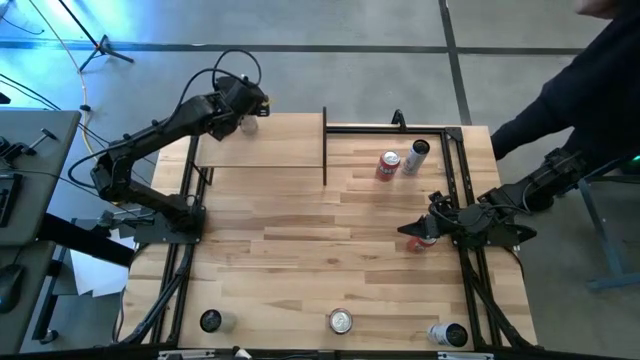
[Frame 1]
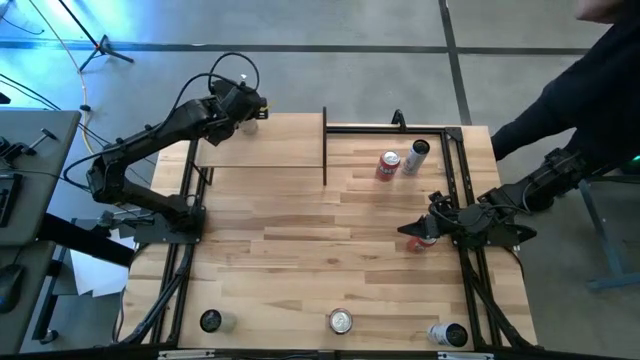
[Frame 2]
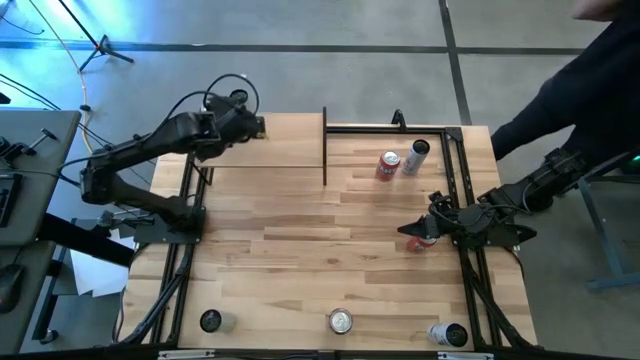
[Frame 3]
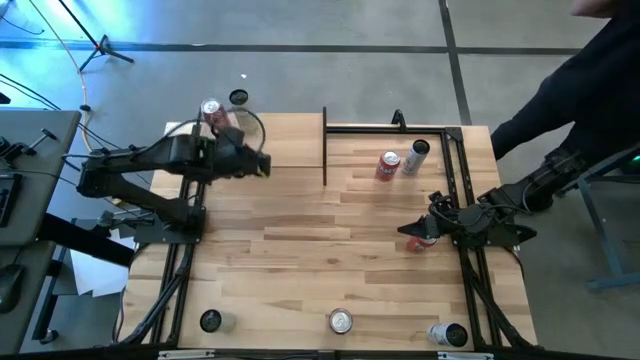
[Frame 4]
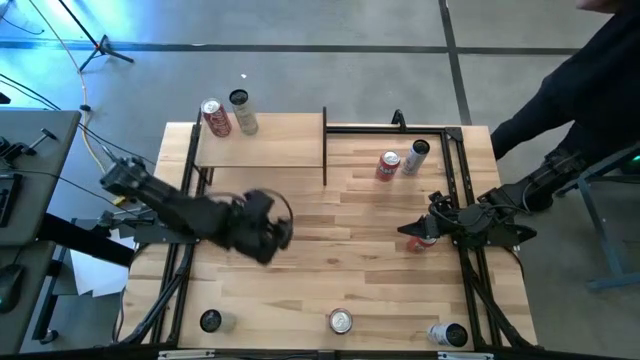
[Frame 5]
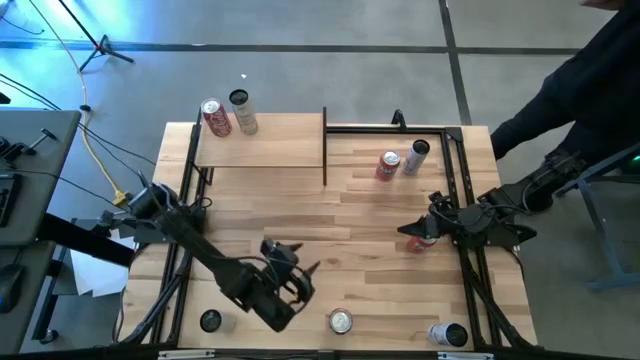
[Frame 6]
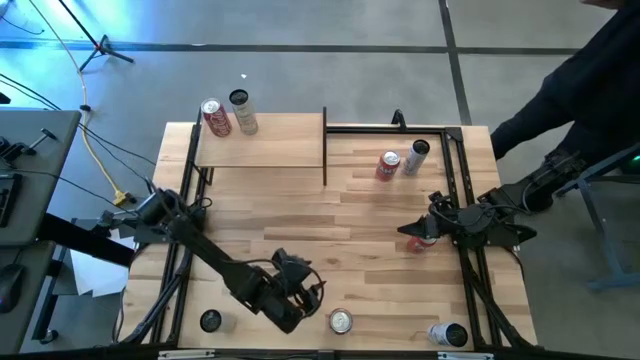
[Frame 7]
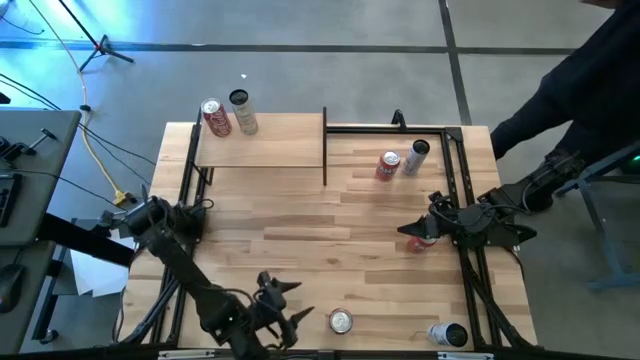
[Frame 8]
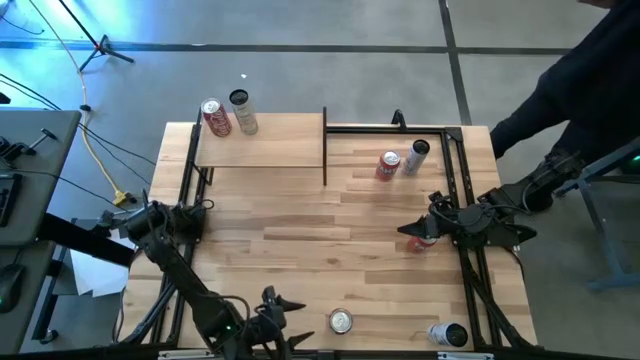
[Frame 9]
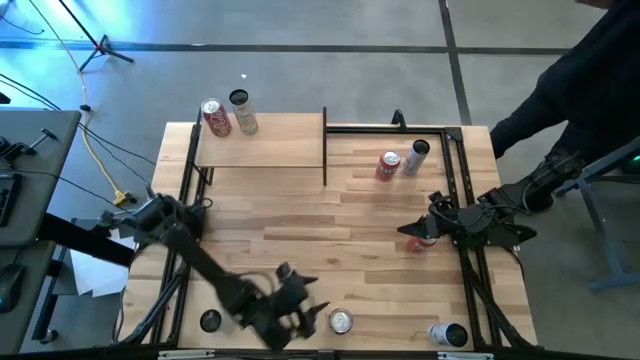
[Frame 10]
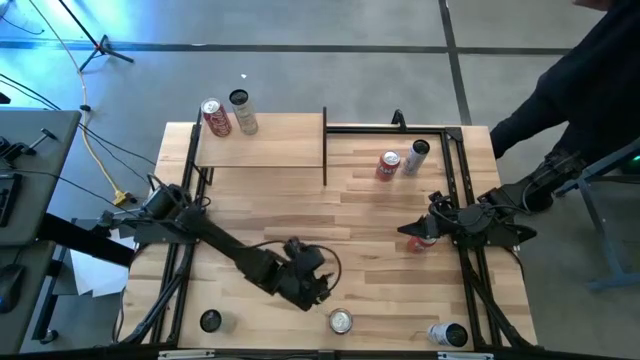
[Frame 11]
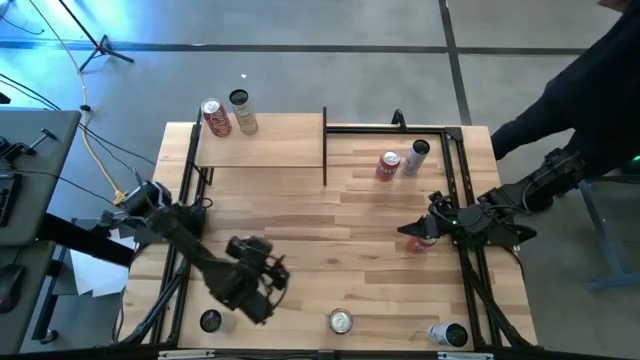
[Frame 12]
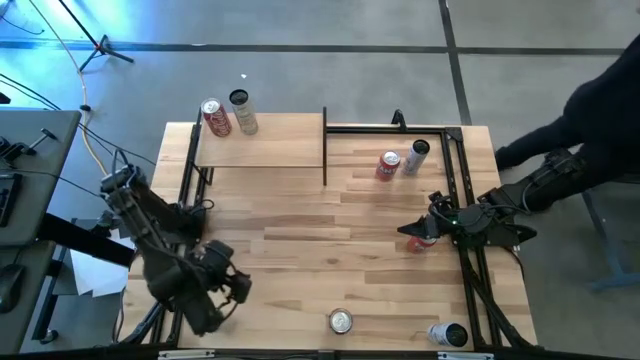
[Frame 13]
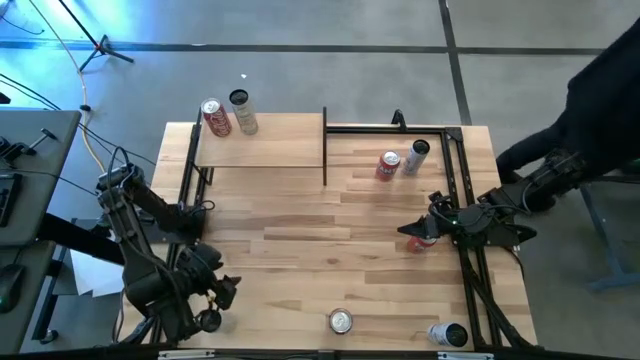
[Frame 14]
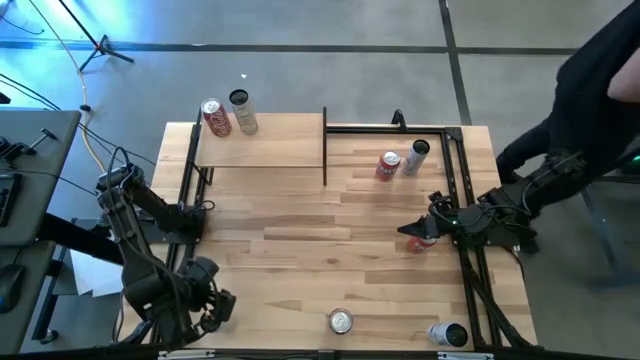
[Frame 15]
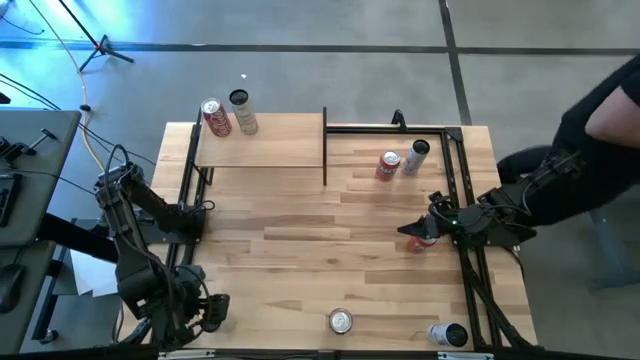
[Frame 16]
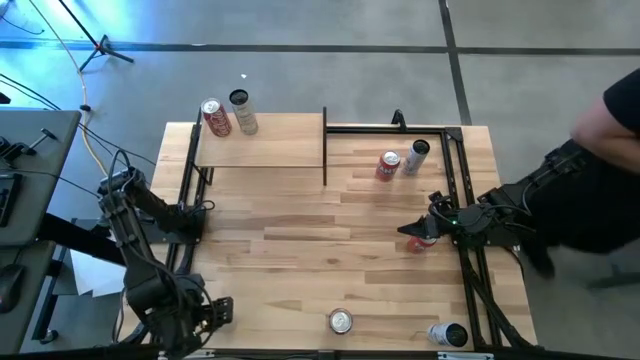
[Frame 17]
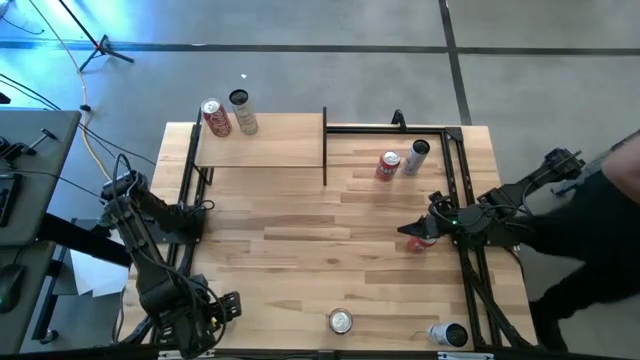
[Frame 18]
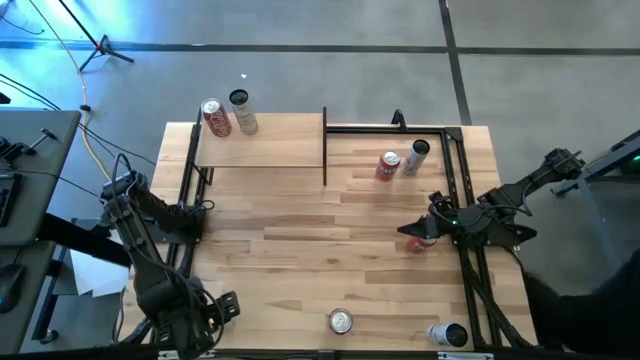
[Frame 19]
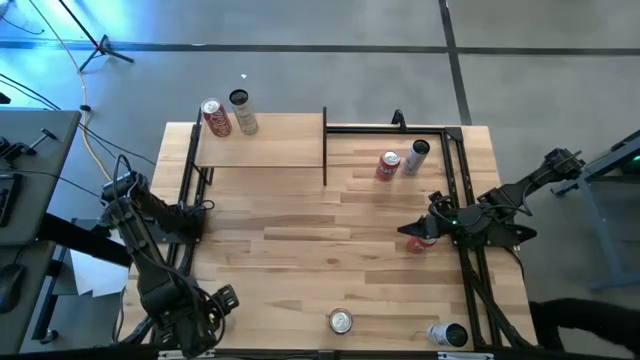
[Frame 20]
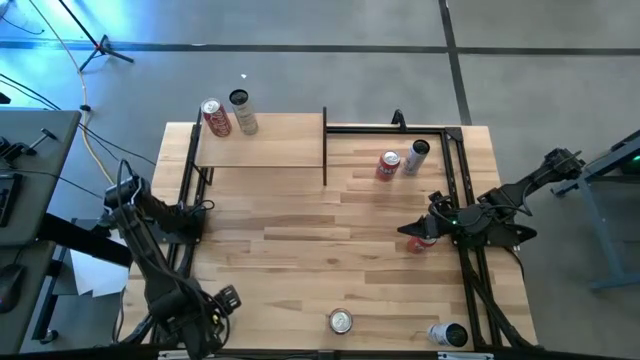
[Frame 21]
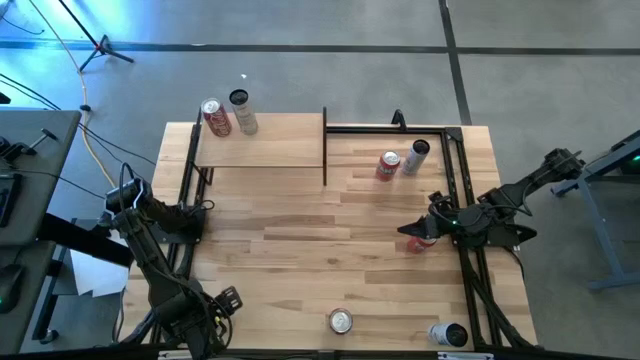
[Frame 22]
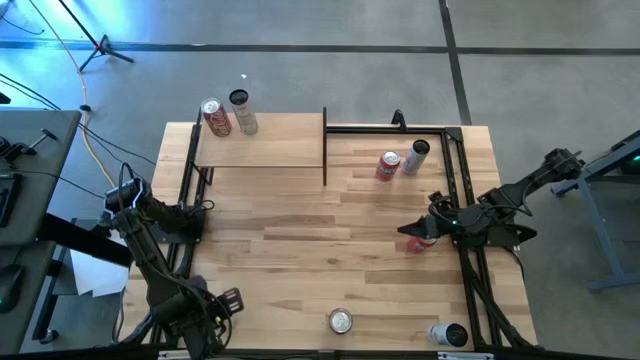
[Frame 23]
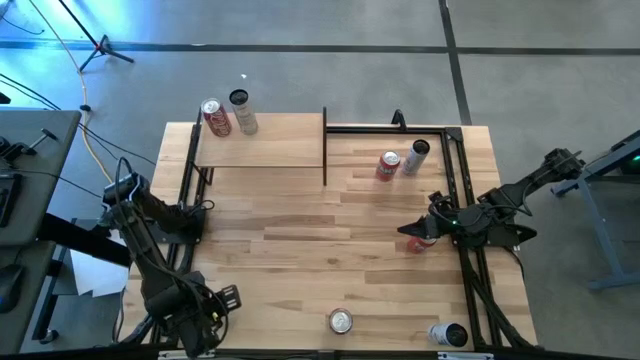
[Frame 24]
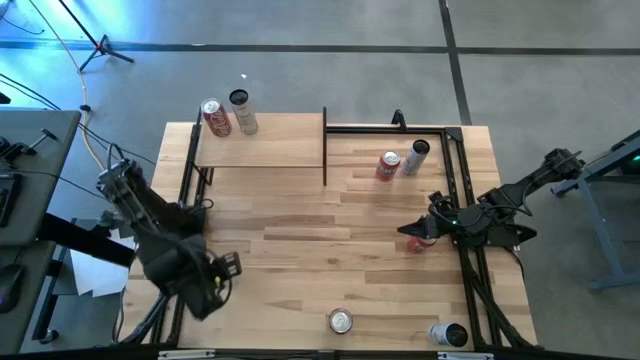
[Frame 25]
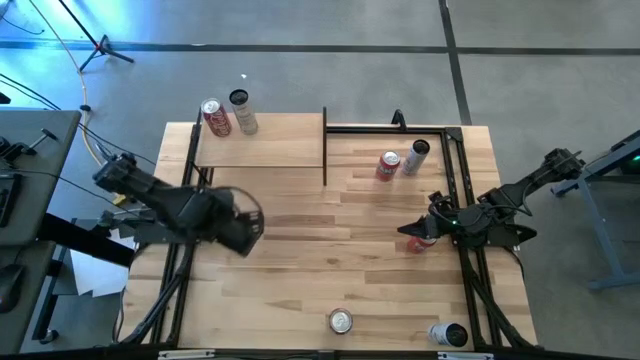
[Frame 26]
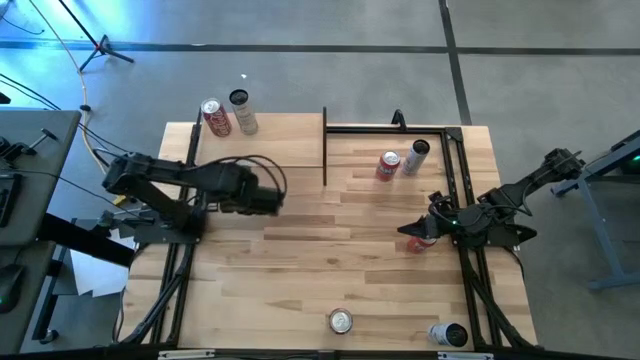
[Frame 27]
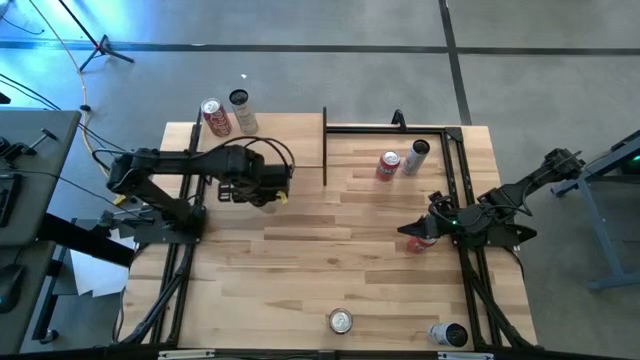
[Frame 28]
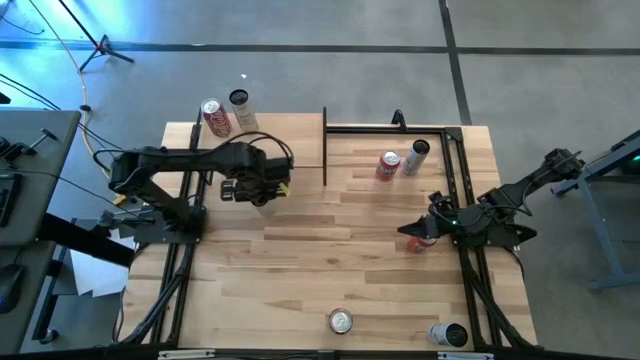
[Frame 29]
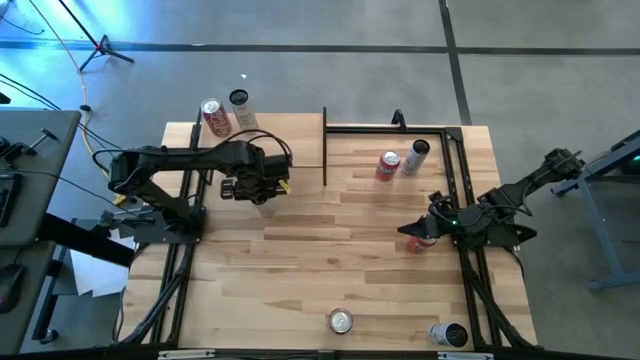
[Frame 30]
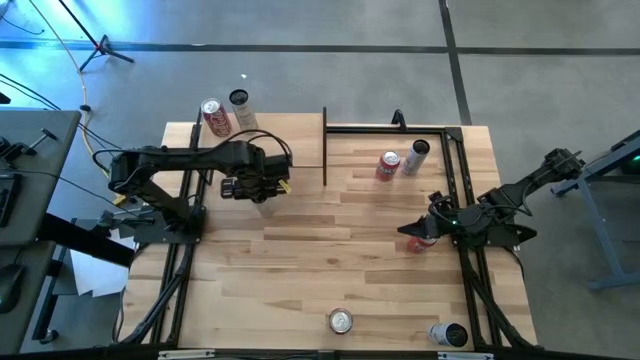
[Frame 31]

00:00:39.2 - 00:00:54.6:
Task: Place canned beverage on shelf
Put the light orange soda can on the shelf aligned with the other light orange soda can

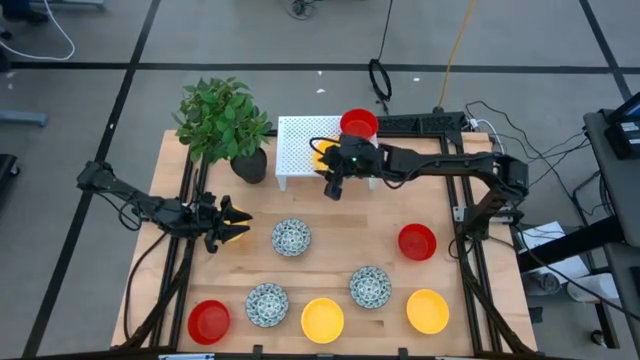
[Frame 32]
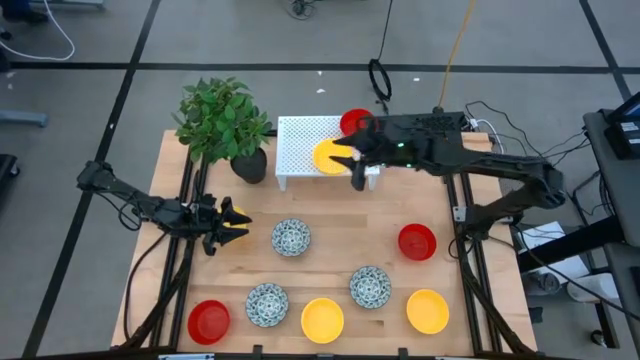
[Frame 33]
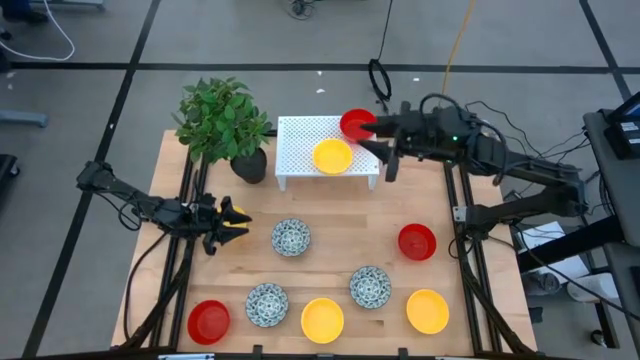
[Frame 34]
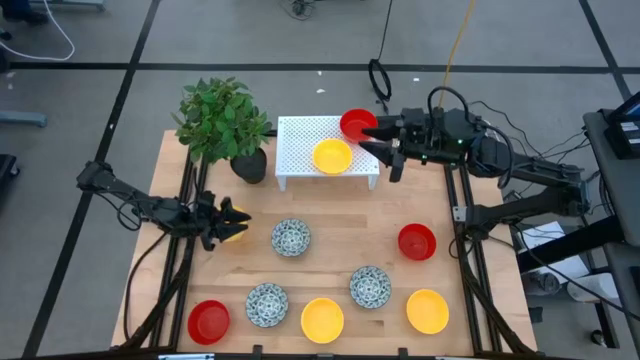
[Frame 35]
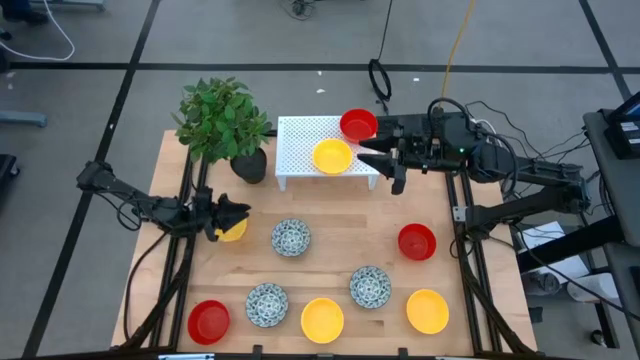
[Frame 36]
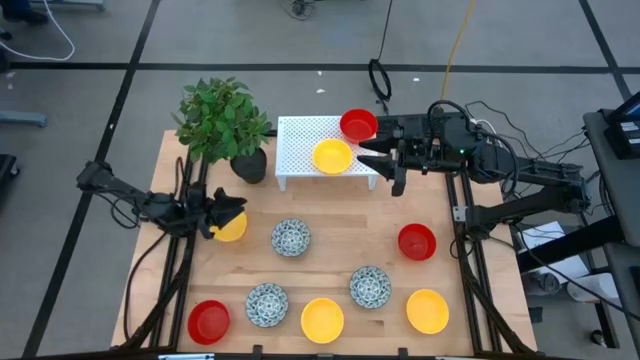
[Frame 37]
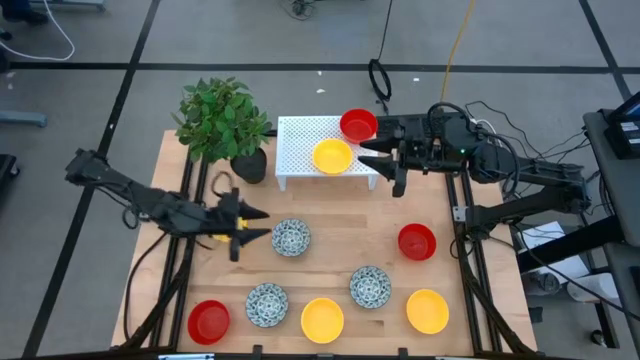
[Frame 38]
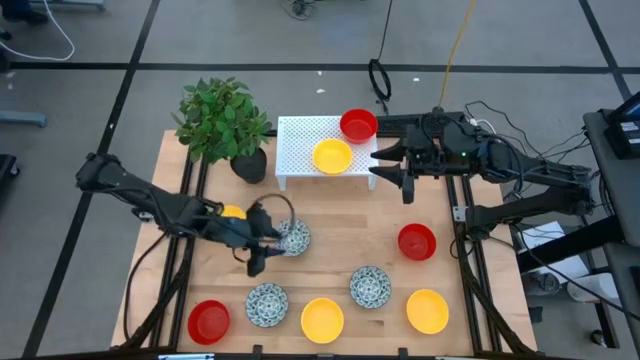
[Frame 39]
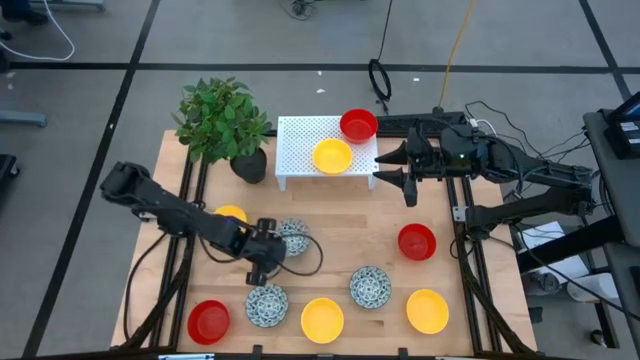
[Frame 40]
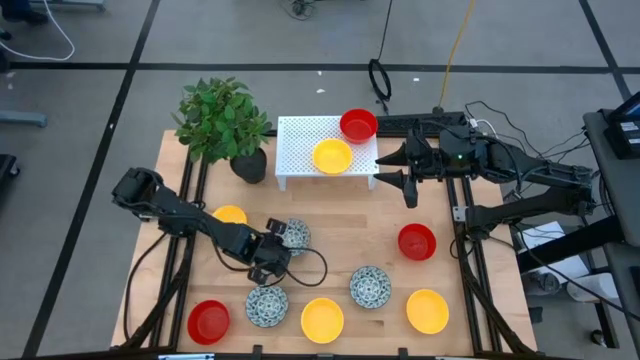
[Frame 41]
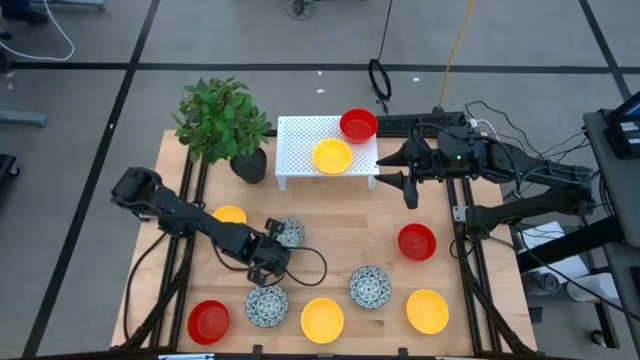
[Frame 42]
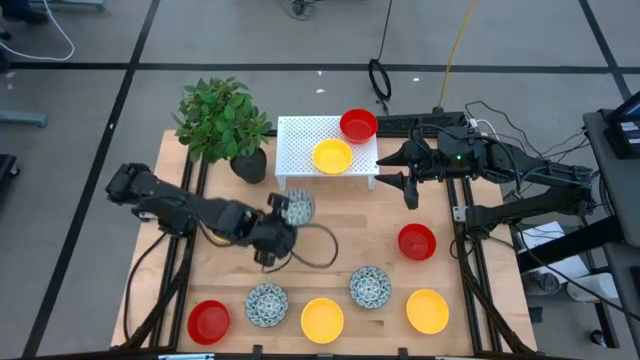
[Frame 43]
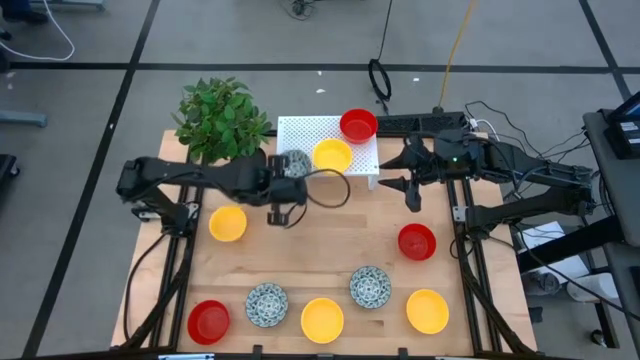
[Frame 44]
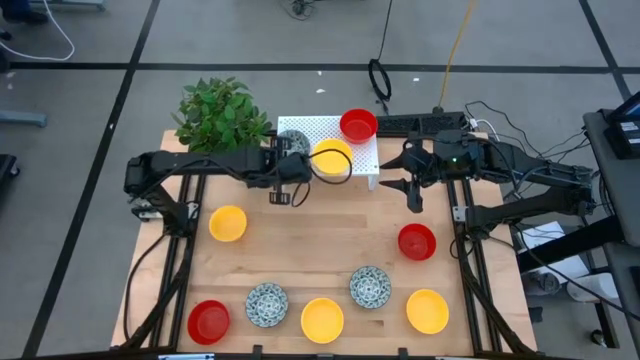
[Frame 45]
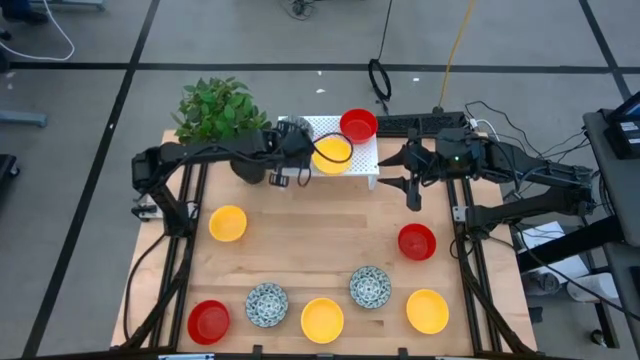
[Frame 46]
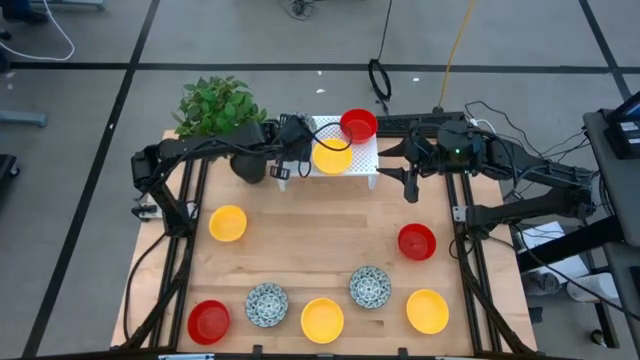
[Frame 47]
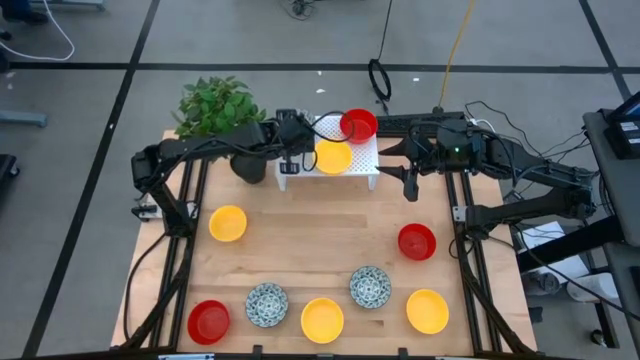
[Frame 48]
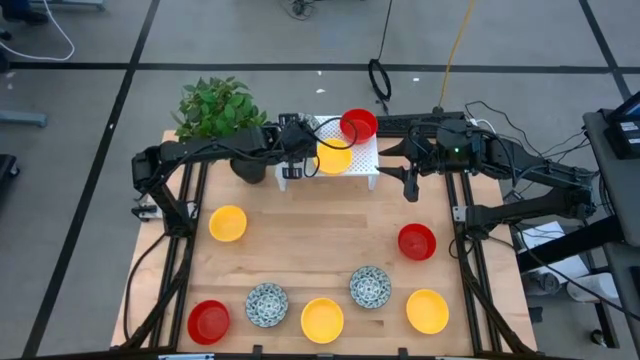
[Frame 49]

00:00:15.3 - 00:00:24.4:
Task: Pick & Place Mini bowls
Put the white patterned bowl on the shelf
